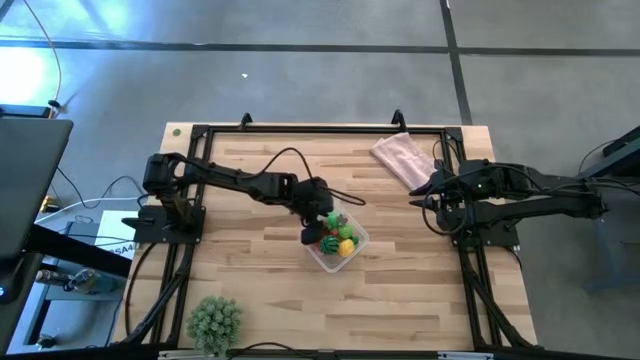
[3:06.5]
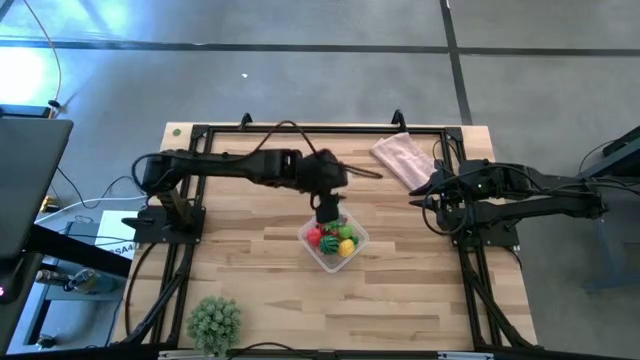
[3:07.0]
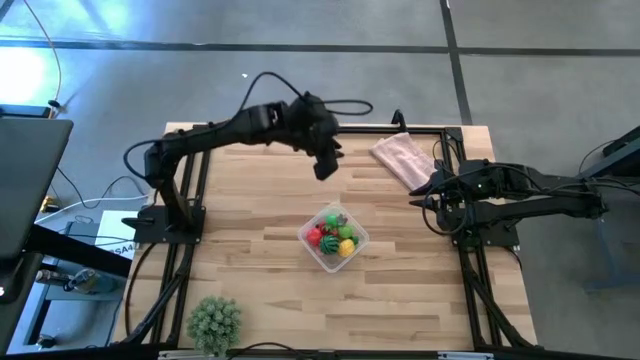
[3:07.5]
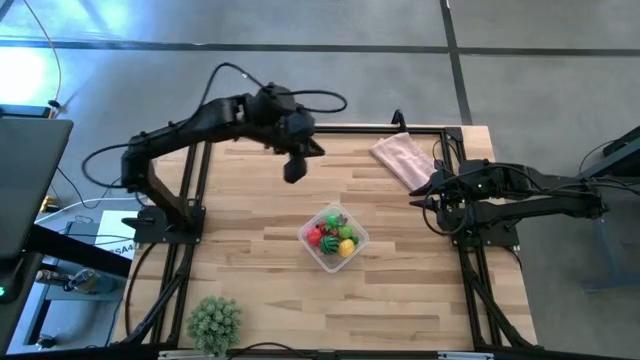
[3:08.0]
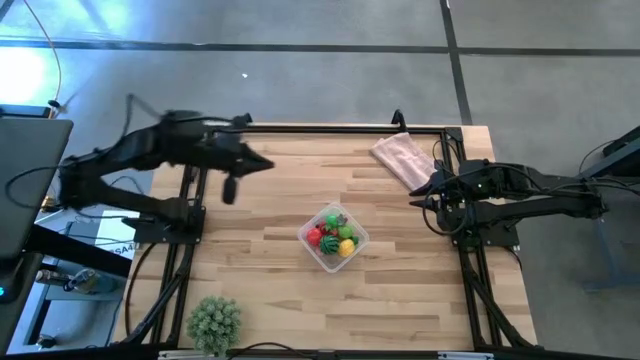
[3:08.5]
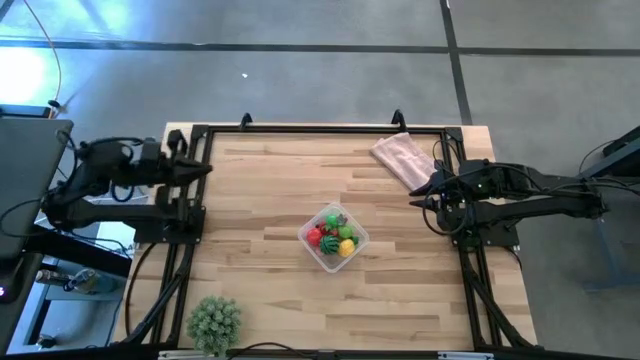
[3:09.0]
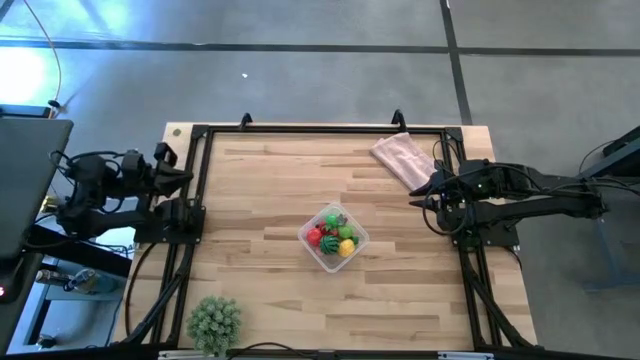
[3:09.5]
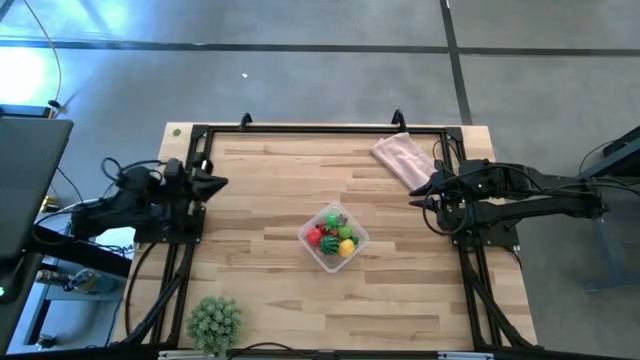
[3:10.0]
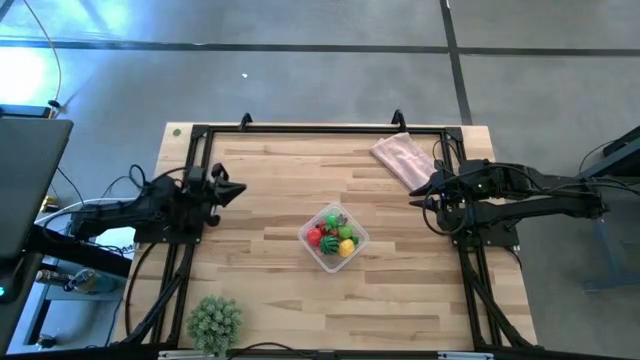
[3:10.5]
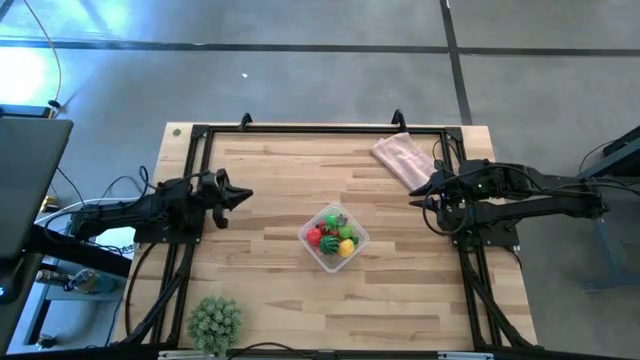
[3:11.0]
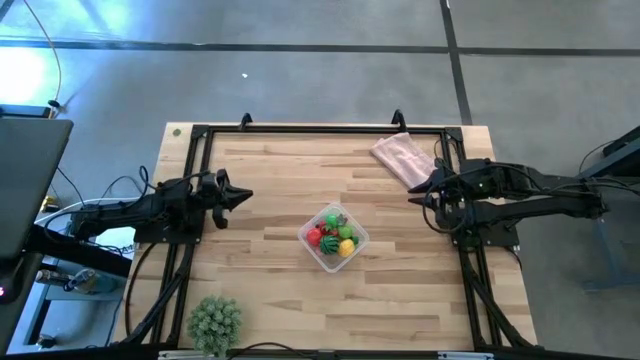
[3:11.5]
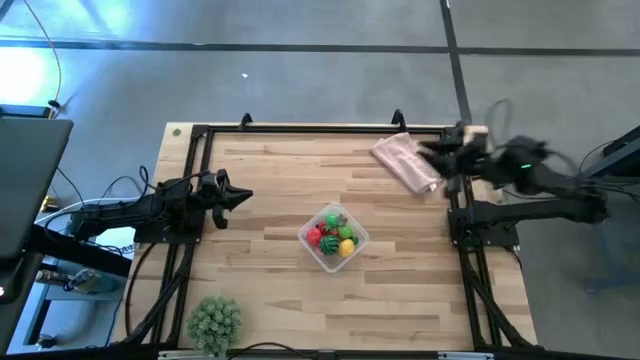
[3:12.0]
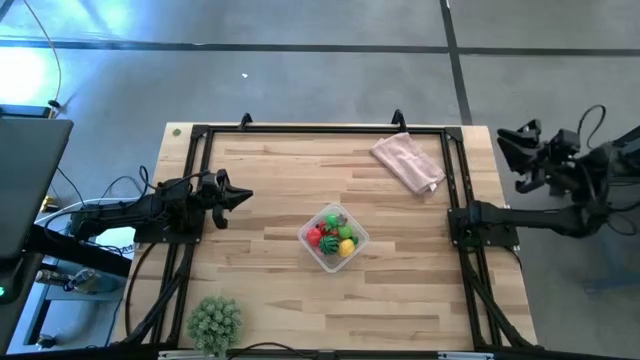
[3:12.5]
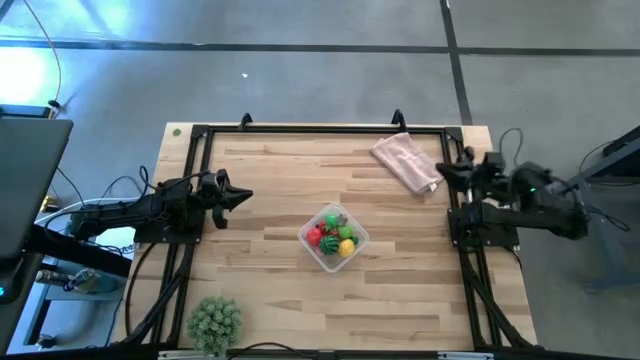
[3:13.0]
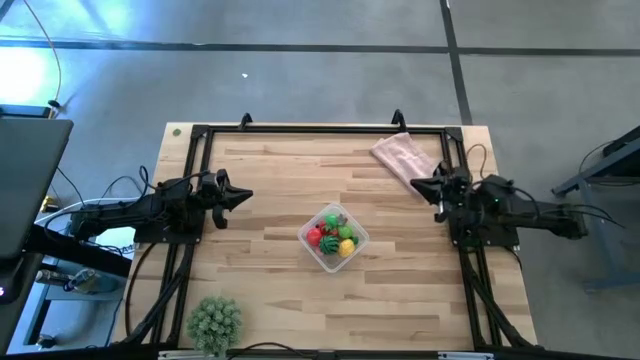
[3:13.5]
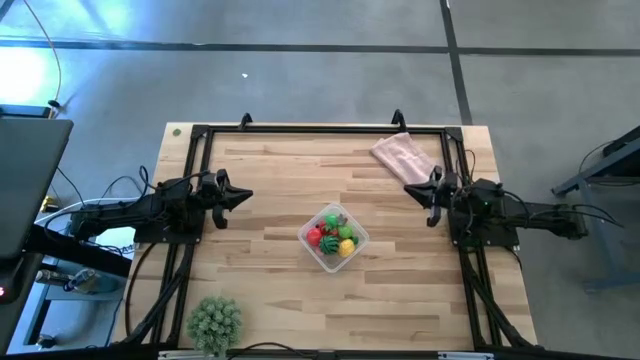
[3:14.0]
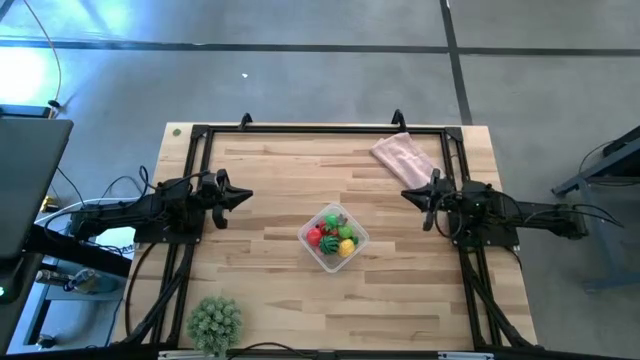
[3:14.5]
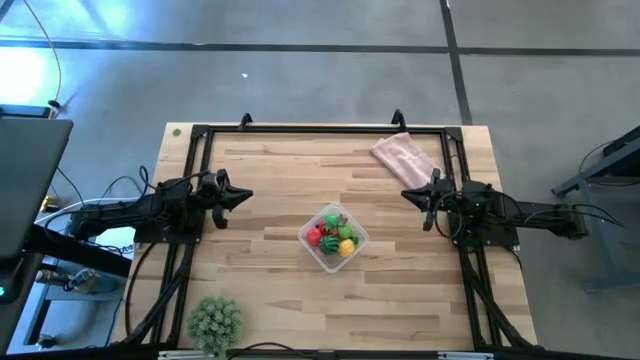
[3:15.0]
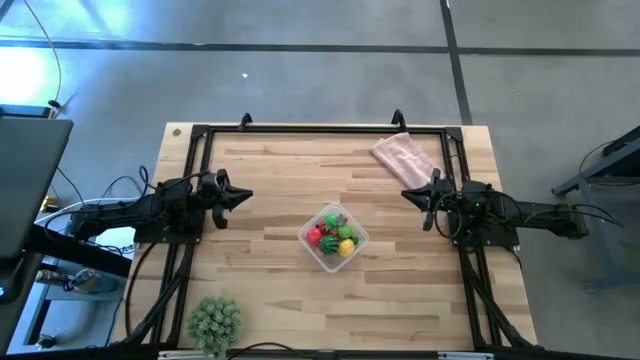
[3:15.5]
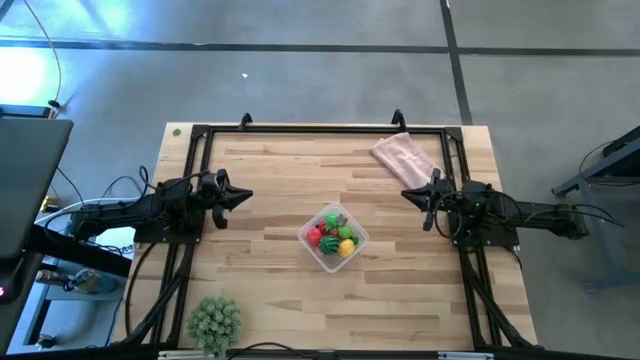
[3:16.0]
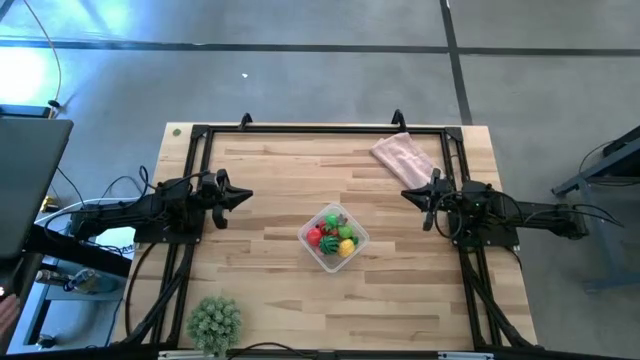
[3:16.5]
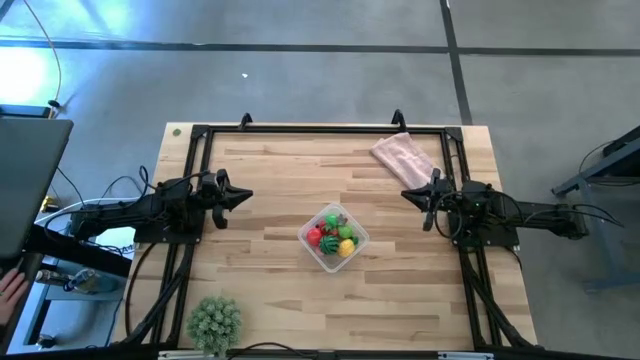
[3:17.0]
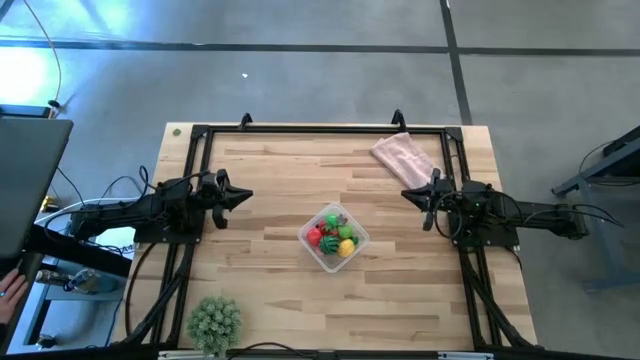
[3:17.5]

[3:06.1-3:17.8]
Task: Pick and placing Produce into tupperware
Return to Home Position

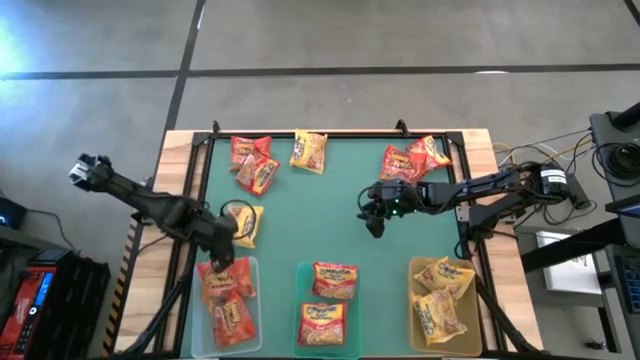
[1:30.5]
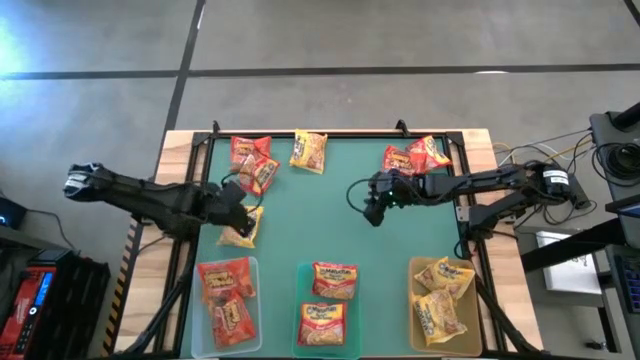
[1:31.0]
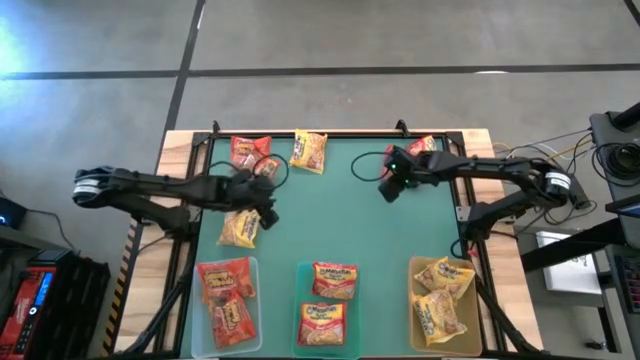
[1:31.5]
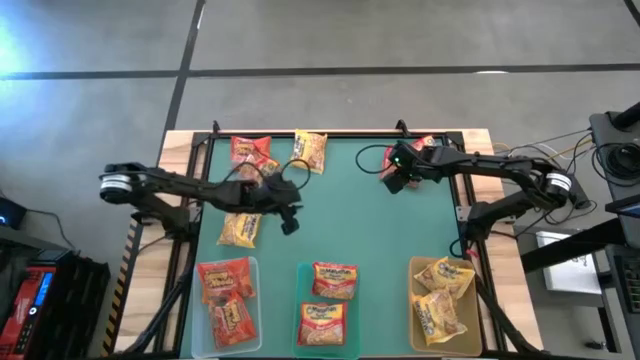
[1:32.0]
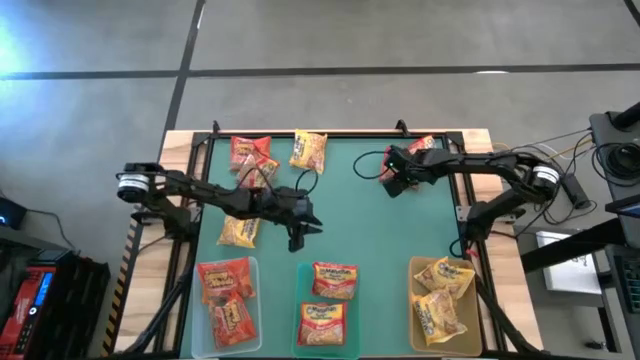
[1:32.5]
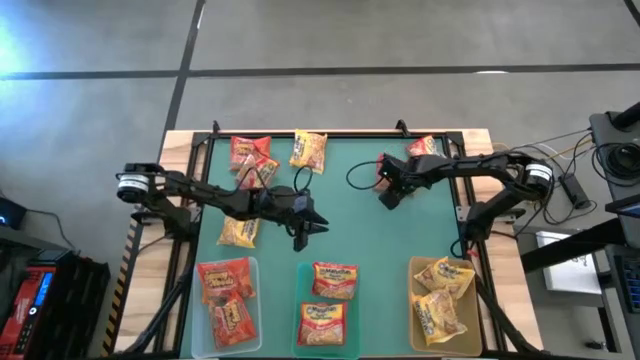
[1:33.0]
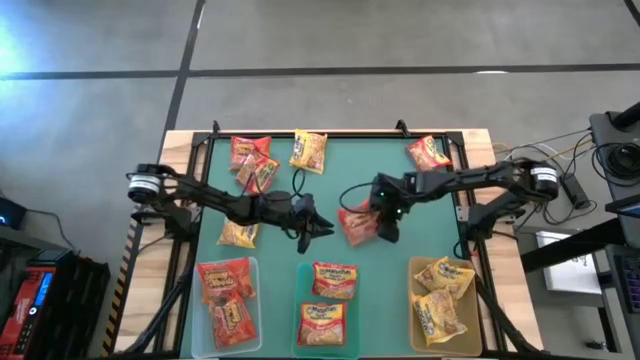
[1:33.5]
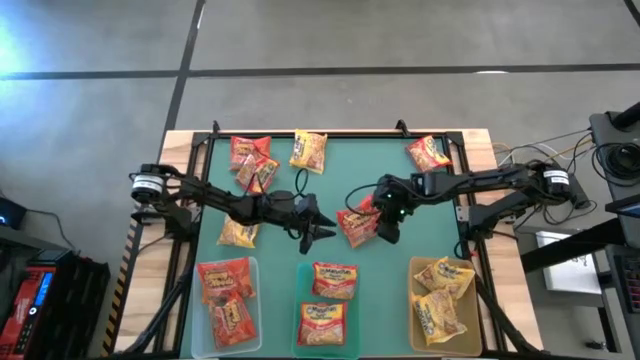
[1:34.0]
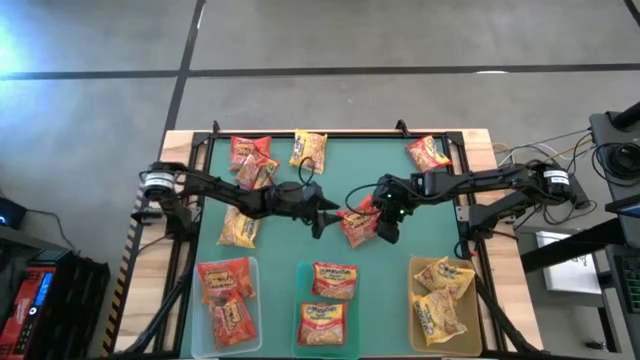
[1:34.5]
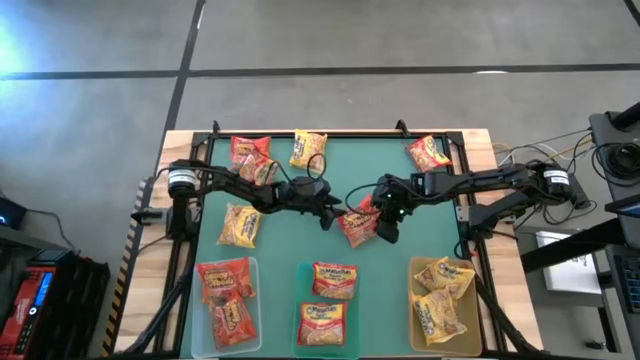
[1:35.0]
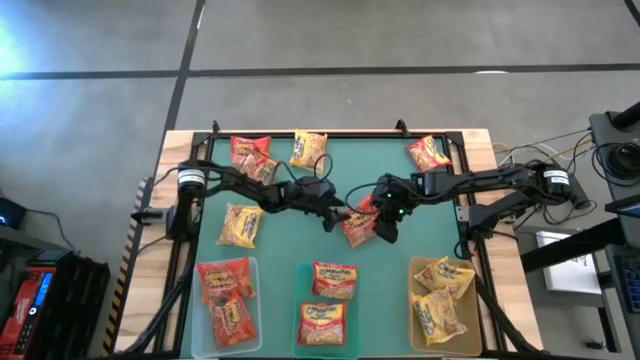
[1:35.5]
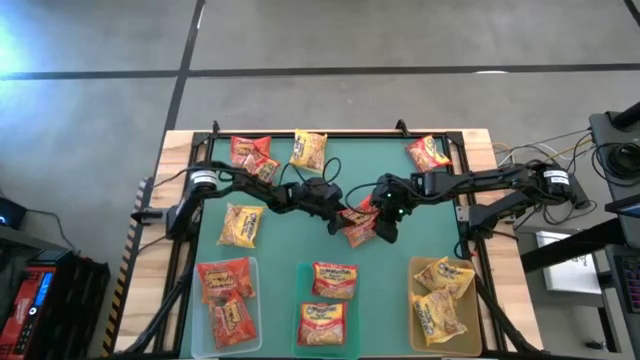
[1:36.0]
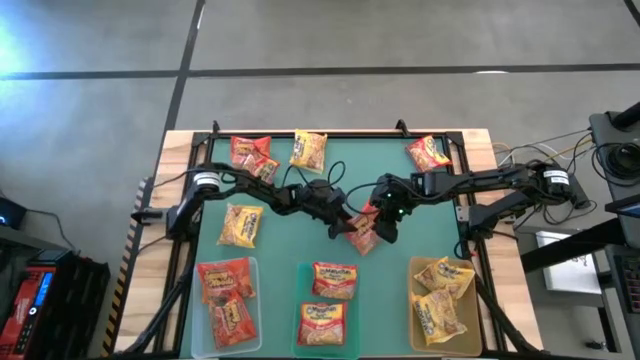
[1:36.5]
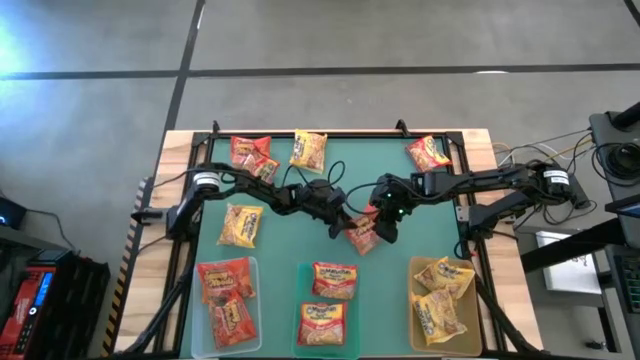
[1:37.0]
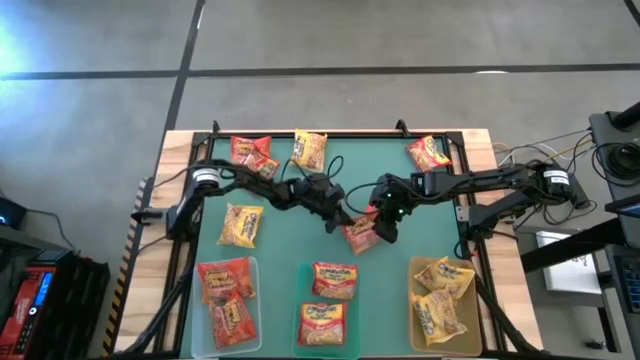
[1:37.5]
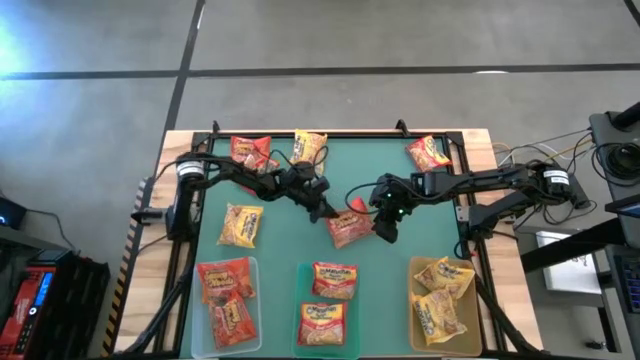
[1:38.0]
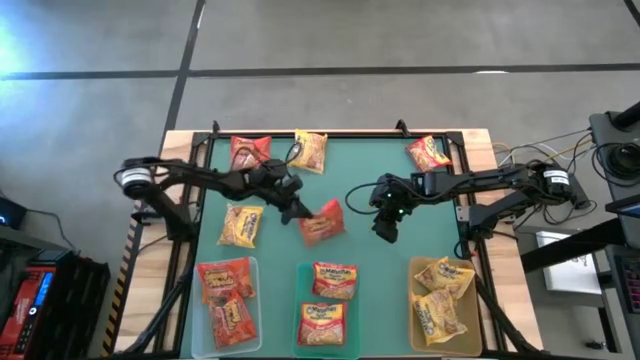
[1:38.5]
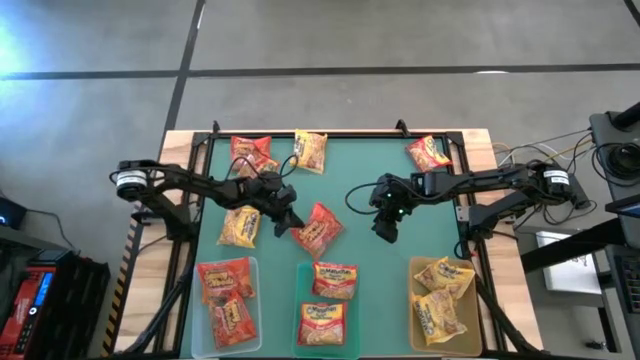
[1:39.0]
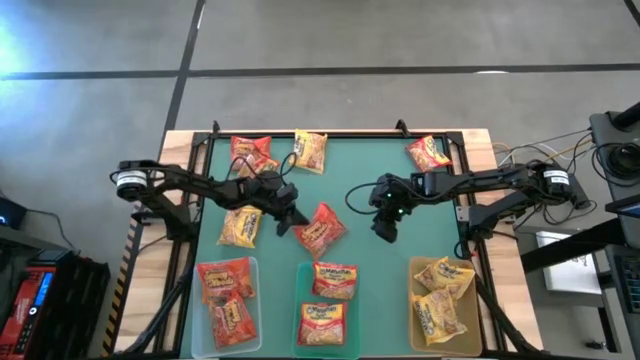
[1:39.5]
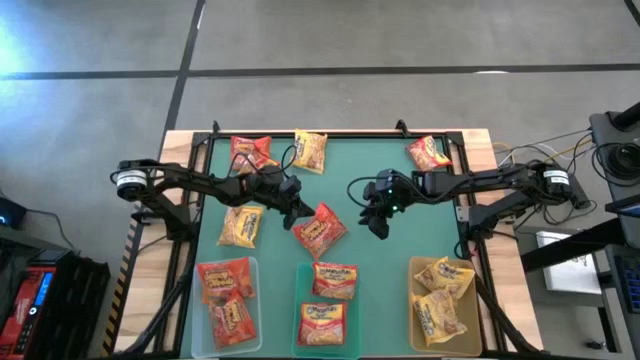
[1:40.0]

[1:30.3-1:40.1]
Task: Sort Maruchan noodles
Put the orange noodle pack into the transparent bin
